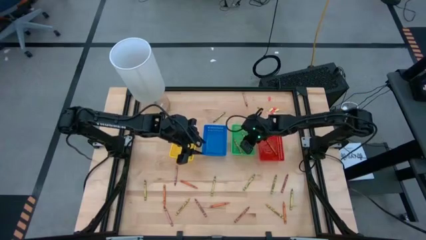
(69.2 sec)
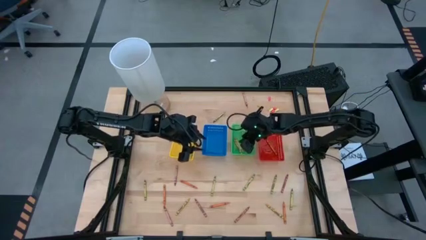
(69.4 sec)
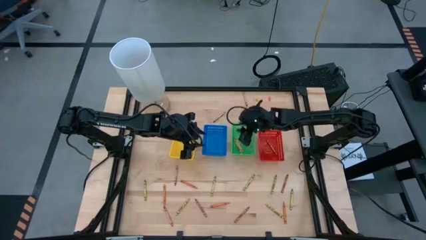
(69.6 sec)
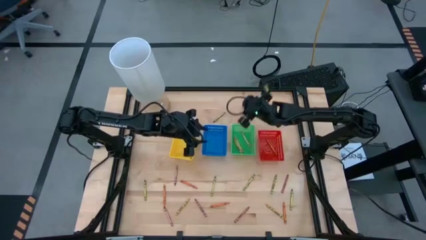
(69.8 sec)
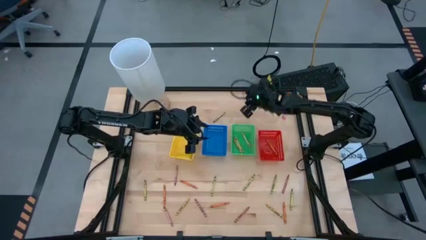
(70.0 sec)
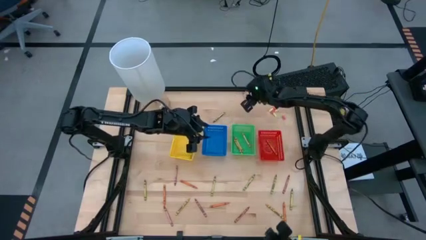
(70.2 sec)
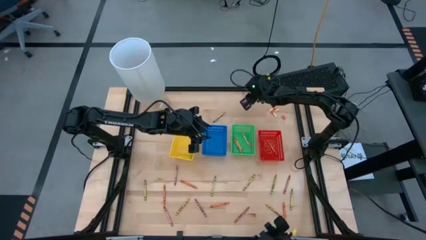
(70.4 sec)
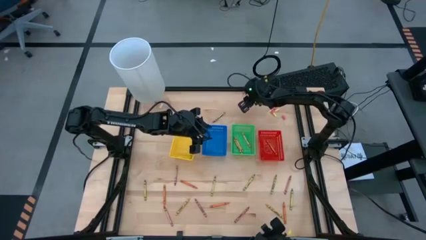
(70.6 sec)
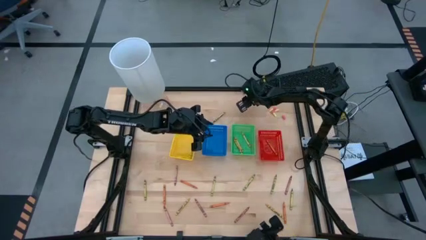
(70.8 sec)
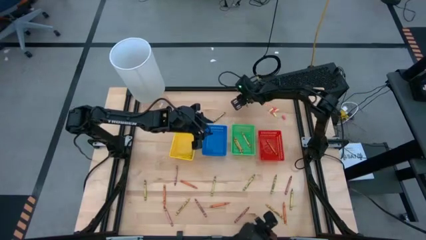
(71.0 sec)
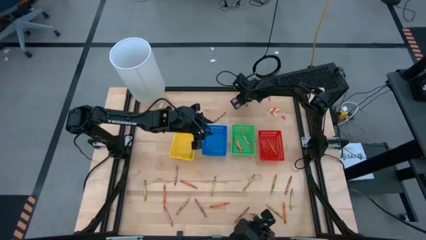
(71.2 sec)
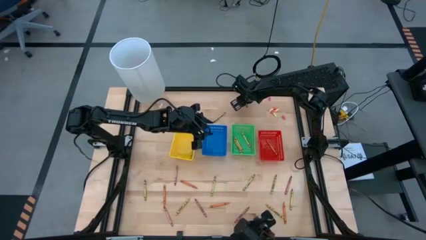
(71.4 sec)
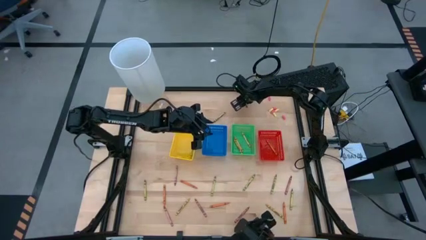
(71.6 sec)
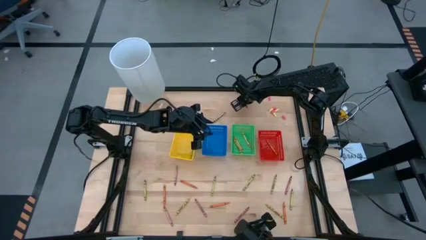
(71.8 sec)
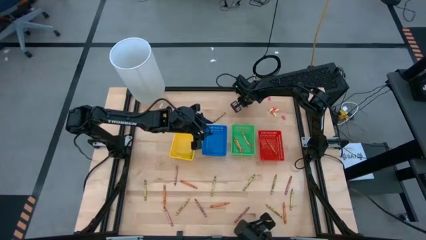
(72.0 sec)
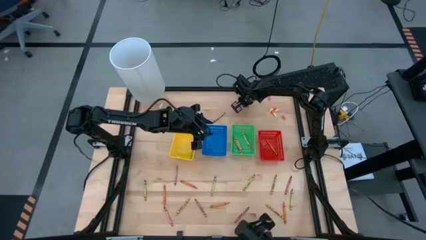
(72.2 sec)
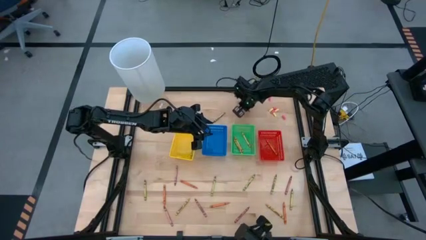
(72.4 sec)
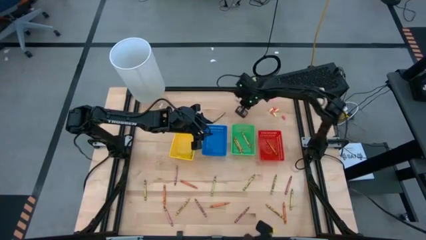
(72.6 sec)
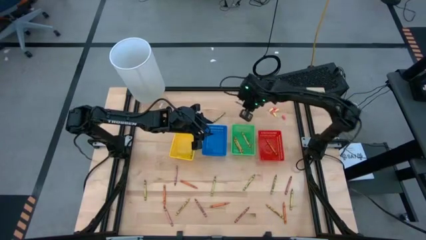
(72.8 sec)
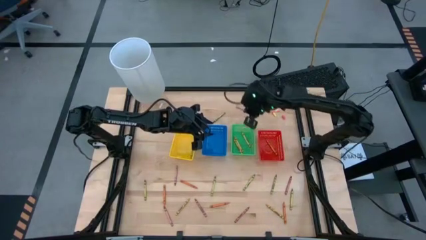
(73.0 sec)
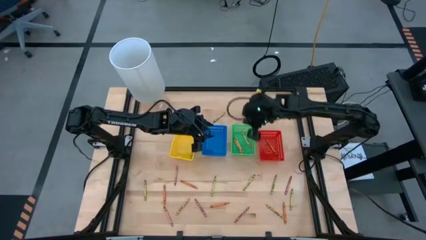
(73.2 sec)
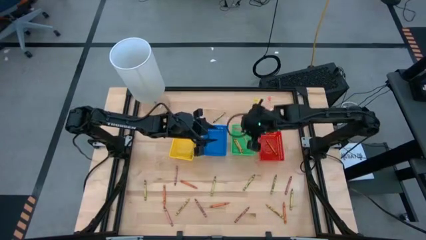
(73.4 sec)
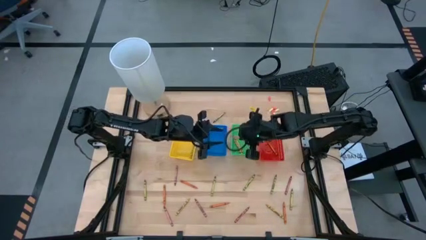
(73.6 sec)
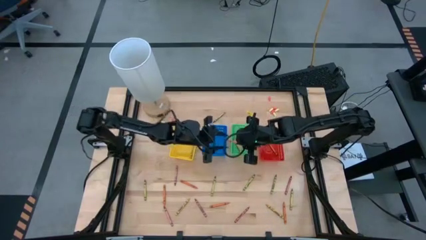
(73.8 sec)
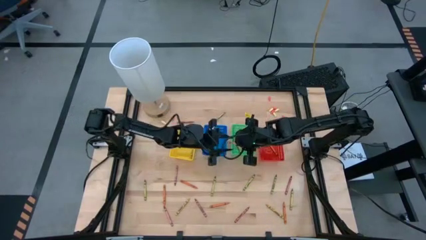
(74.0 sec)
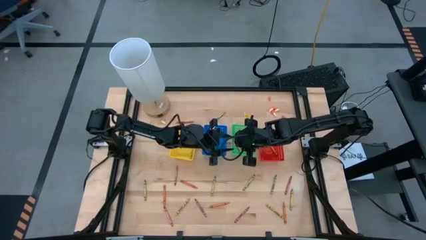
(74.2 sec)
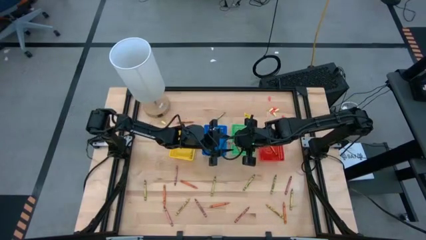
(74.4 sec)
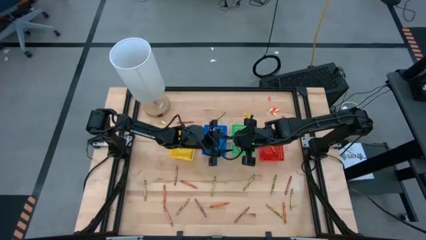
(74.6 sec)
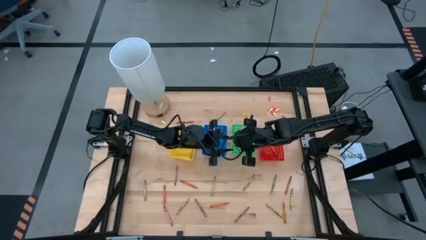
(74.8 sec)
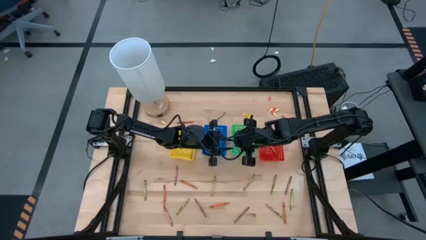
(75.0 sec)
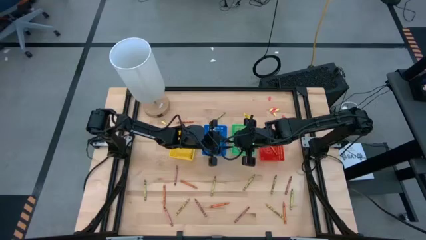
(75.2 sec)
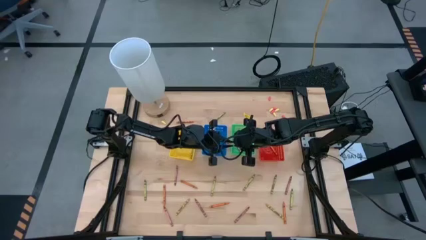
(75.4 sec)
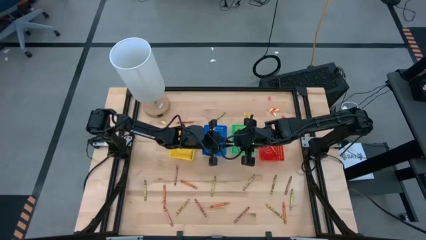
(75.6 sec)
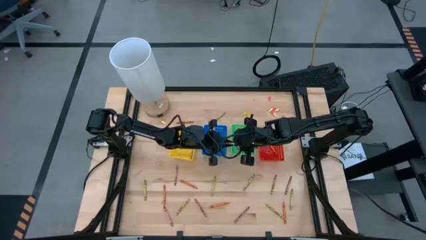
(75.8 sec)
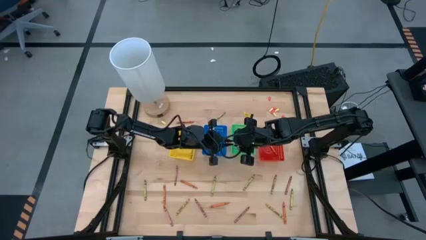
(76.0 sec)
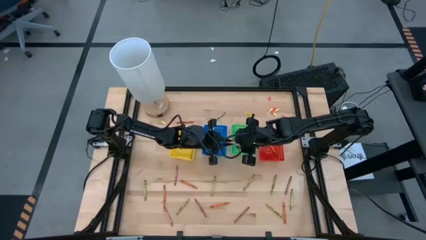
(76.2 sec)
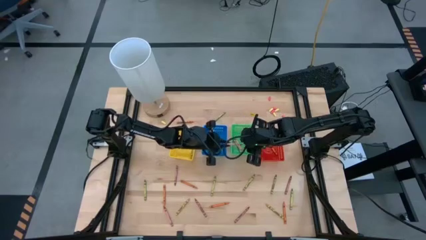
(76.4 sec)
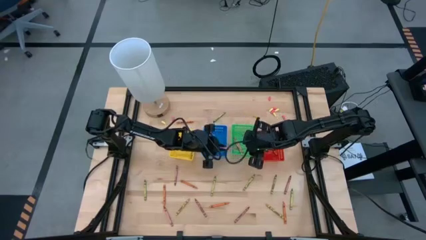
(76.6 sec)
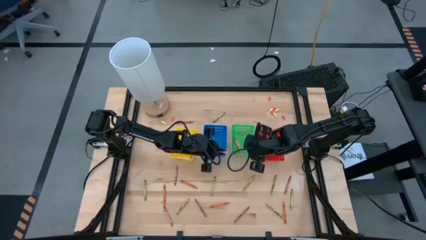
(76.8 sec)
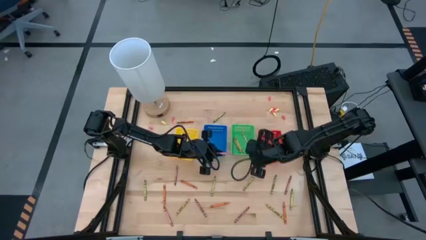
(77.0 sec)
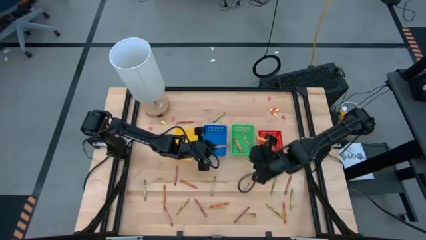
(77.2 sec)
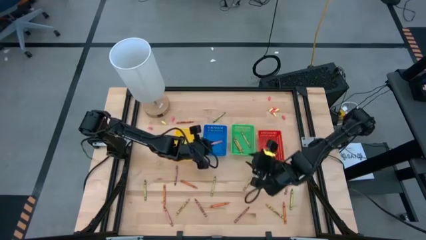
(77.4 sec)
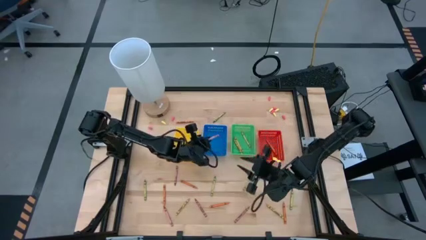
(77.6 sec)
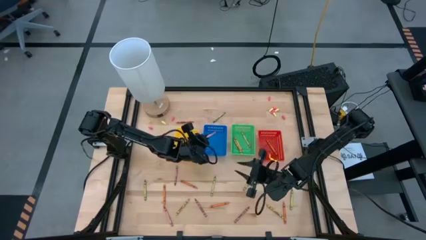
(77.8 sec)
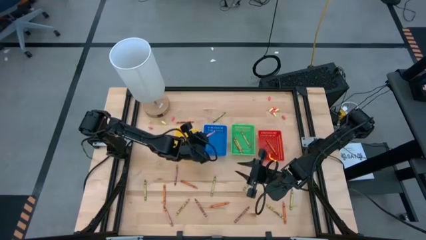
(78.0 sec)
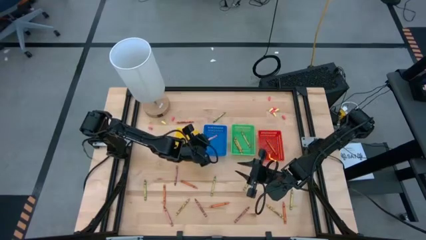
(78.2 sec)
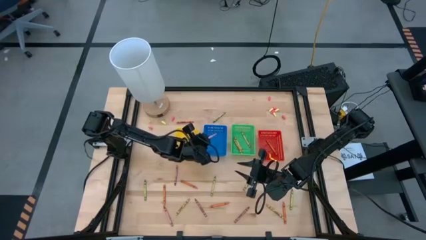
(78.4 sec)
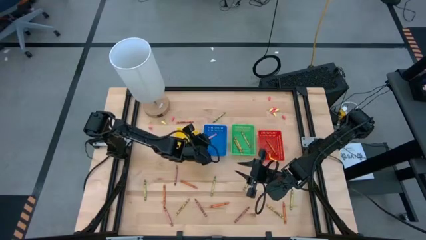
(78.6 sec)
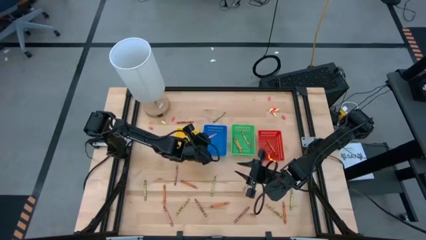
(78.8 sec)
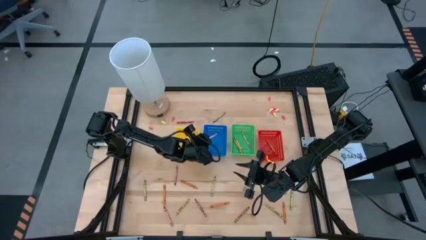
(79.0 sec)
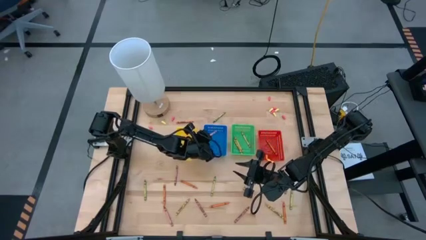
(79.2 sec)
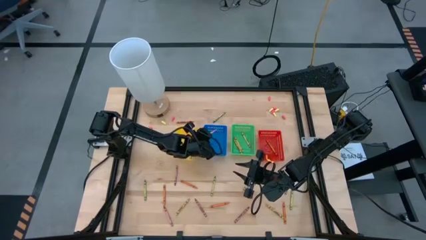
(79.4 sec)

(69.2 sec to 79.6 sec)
Task: Sort crayons
Put the red crayon into the blue bin

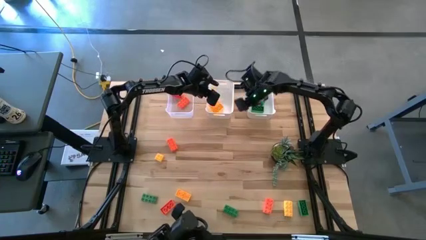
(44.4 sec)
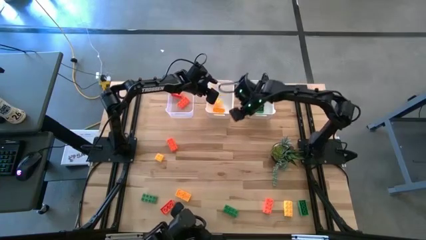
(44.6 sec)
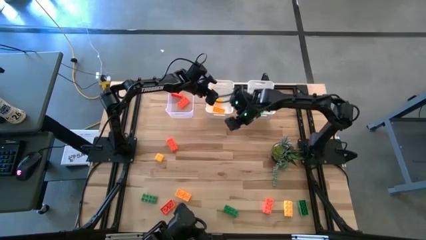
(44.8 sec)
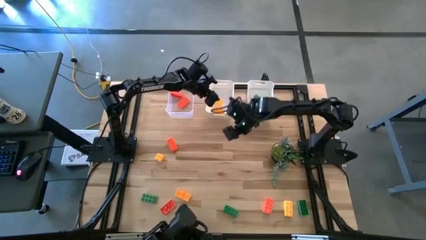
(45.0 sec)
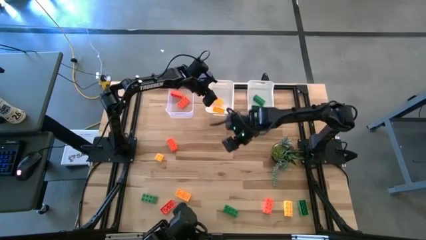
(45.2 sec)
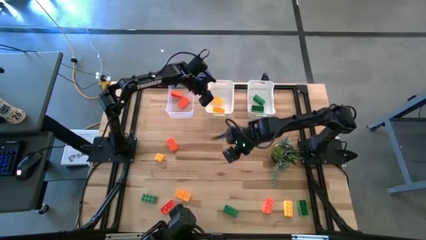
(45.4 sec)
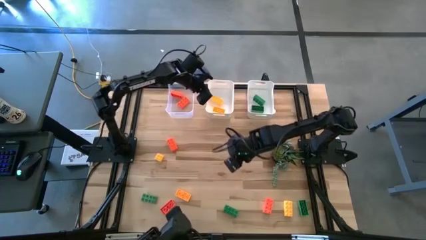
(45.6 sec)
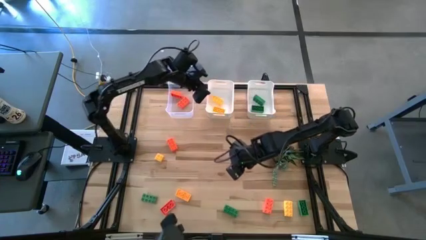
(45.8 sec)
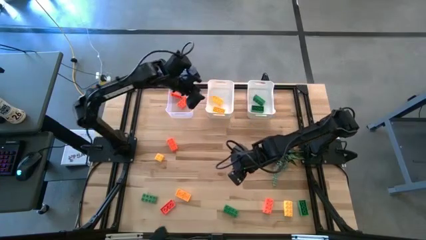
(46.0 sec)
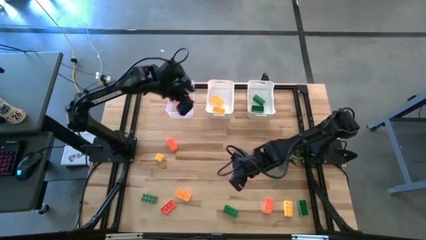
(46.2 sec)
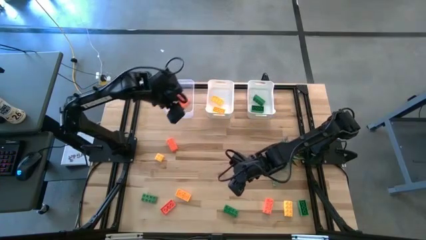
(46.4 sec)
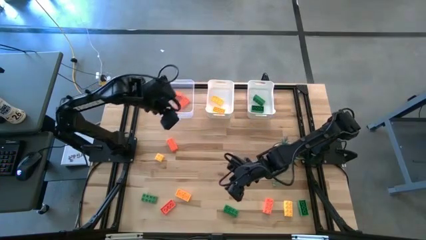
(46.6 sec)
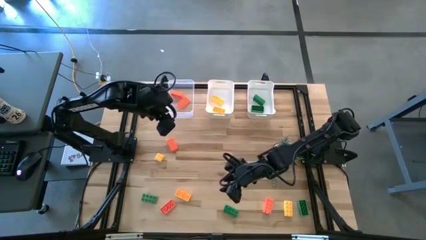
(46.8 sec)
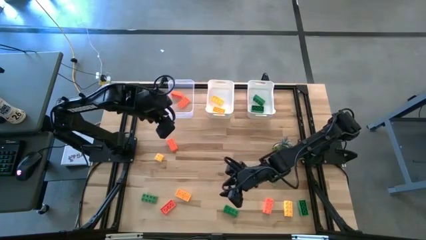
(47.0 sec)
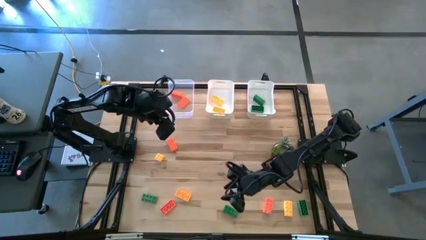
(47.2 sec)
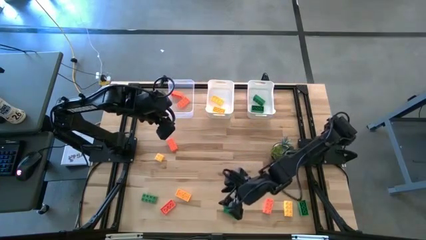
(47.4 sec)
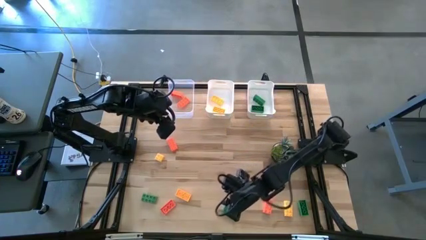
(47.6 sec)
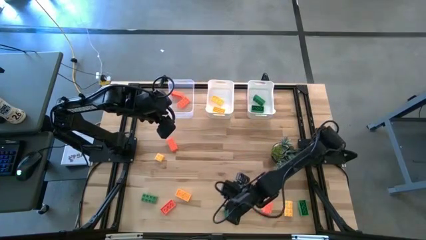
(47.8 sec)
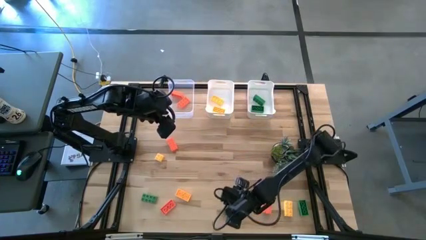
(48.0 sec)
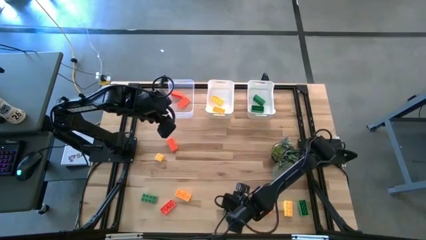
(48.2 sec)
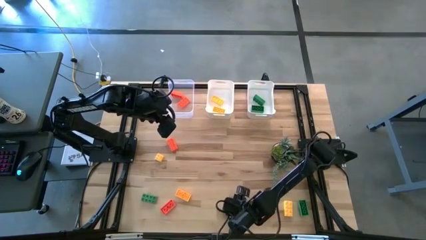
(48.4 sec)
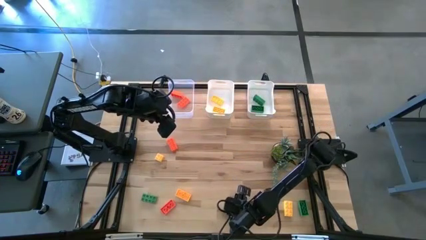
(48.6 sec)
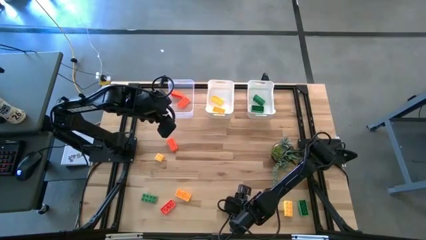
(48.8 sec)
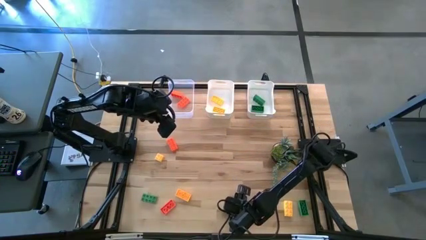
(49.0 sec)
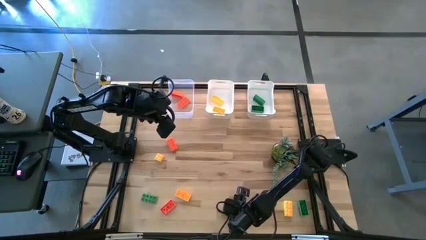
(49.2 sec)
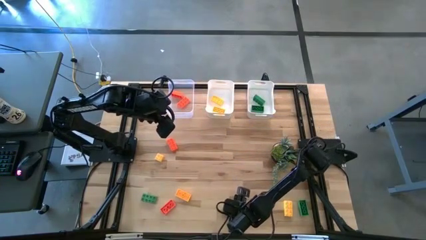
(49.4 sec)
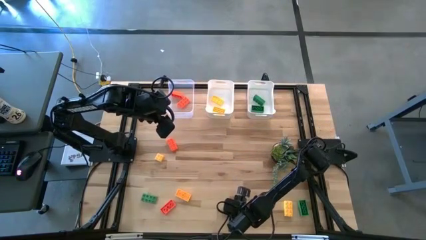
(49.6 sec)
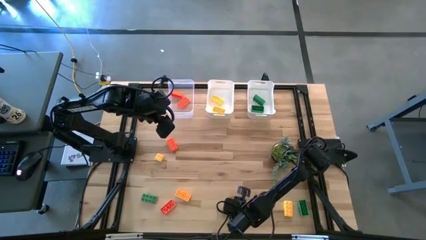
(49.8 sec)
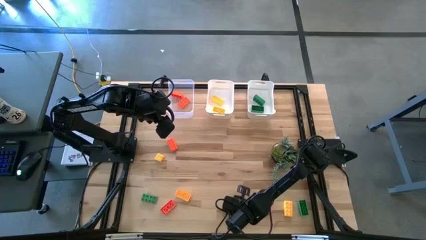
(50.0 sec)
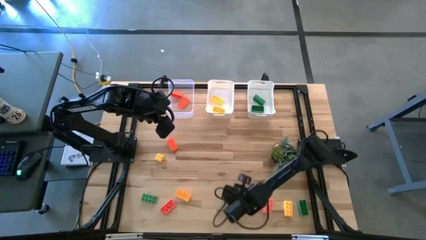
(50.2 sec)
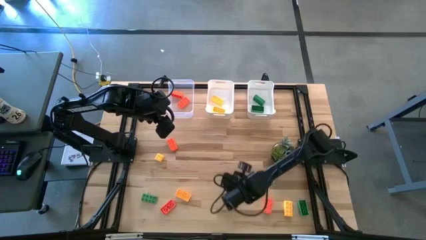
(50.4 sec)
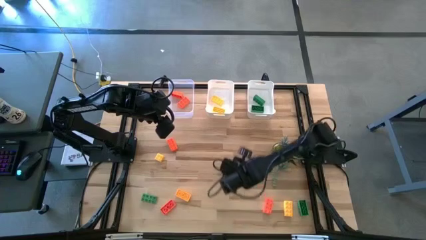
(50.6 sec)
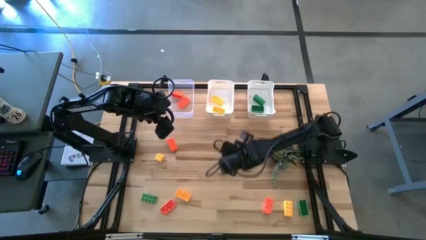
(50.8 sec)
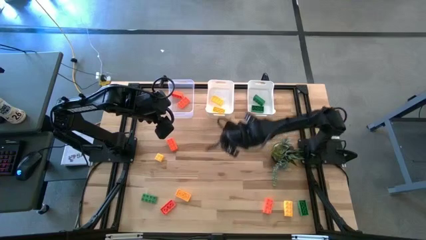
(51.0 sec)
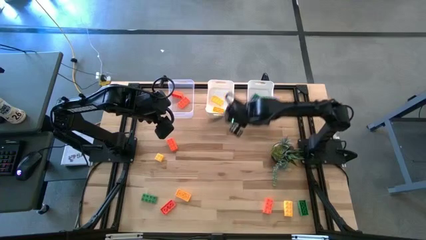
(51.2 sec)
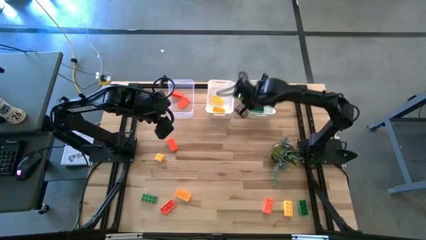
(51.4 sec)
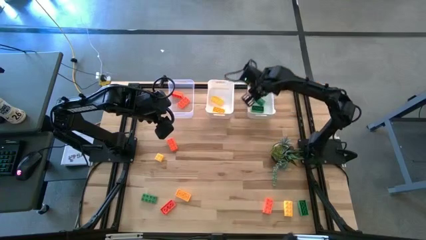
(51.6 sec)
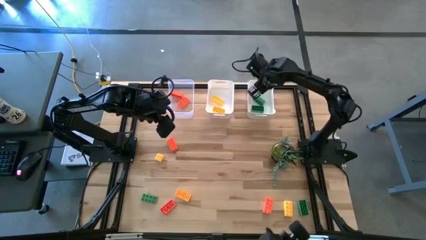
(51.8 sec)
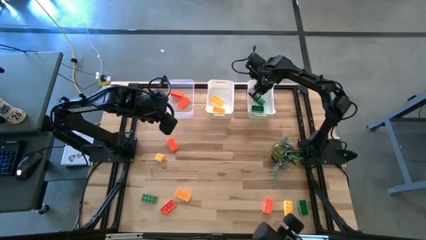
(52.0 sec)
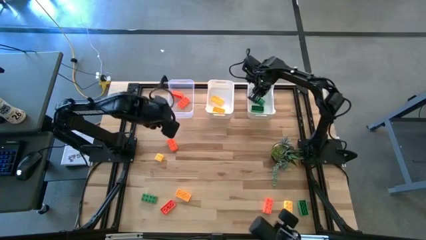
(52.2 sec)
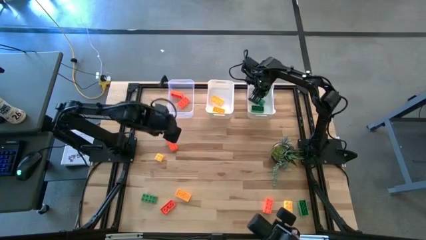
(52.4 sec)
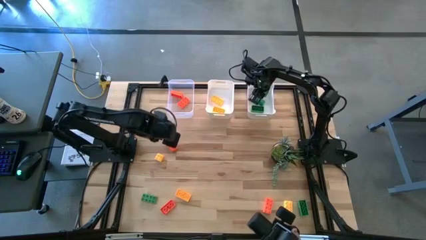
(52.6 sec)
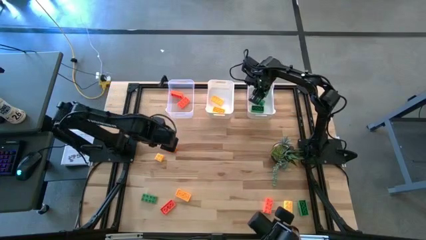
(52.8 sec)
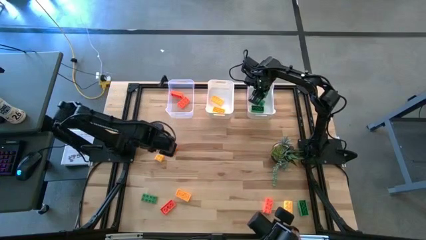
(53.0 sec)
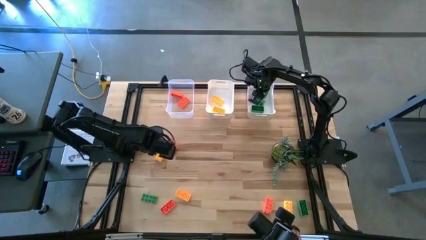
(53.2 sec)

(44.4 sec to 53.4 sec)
Task: Sort & place blocks by color
Put the green game piece into the right white bin
